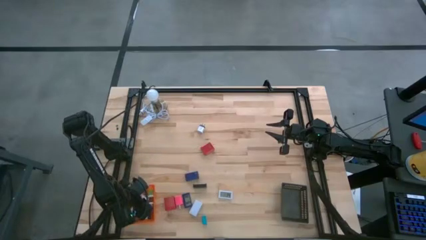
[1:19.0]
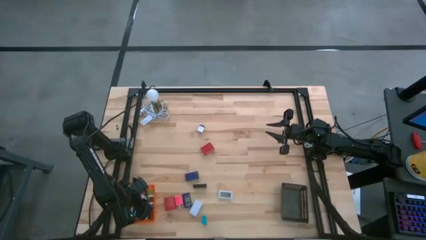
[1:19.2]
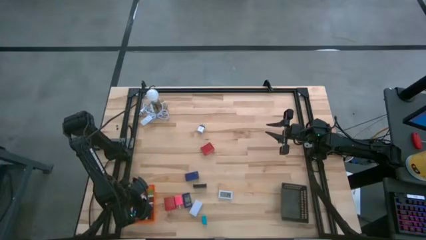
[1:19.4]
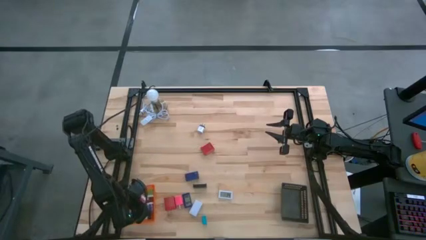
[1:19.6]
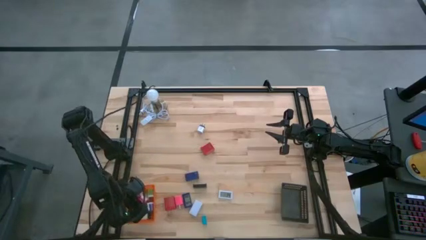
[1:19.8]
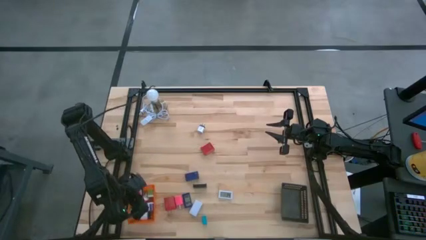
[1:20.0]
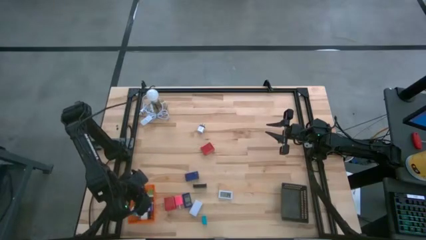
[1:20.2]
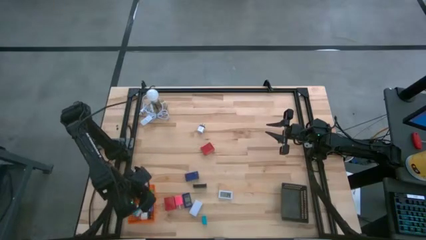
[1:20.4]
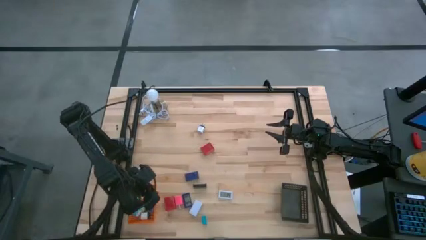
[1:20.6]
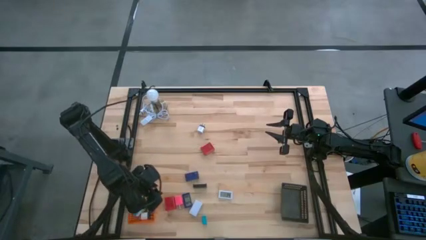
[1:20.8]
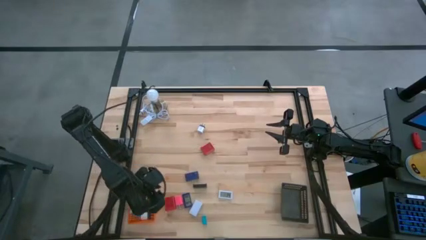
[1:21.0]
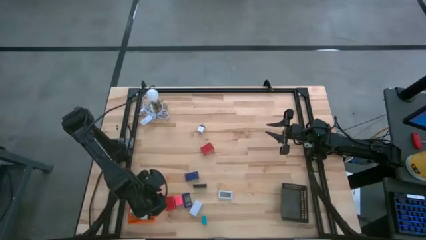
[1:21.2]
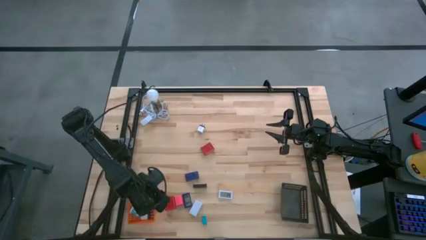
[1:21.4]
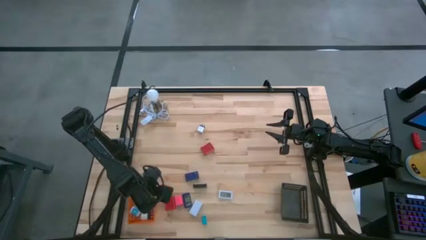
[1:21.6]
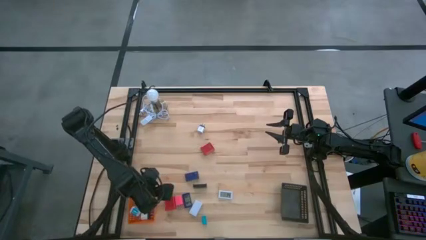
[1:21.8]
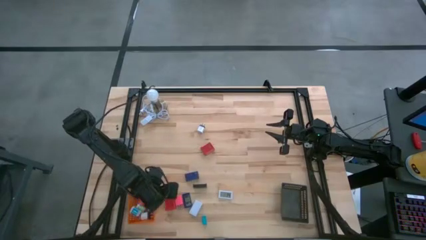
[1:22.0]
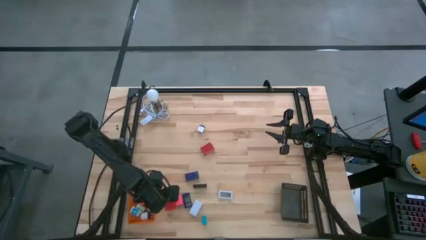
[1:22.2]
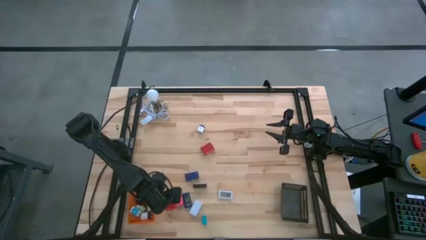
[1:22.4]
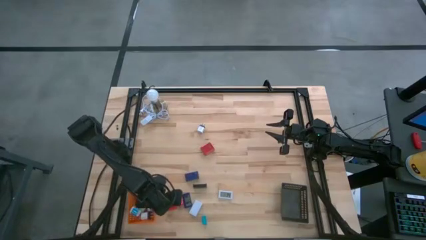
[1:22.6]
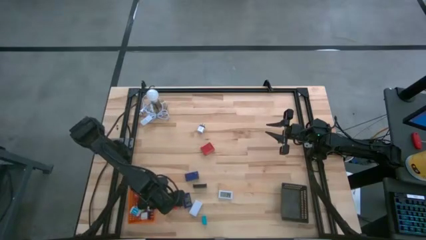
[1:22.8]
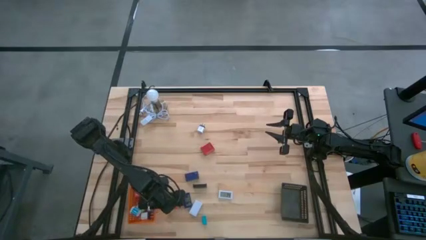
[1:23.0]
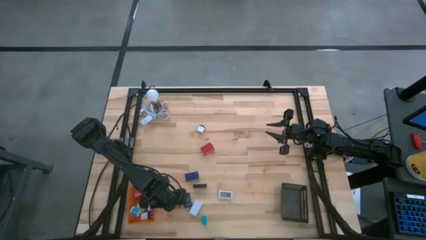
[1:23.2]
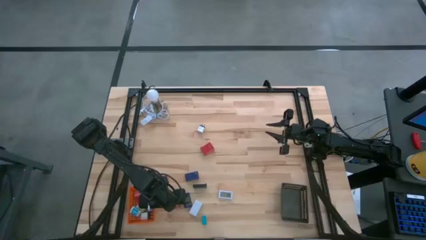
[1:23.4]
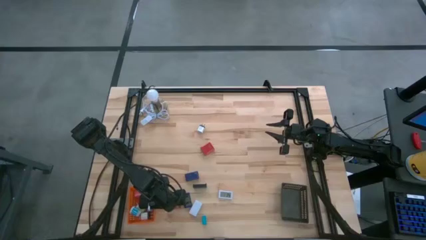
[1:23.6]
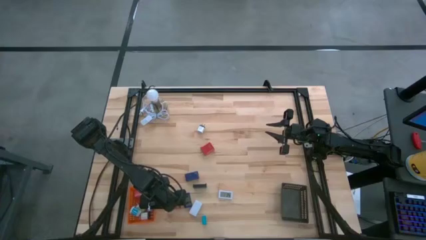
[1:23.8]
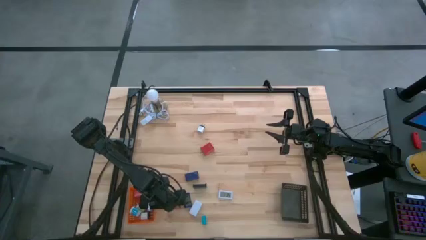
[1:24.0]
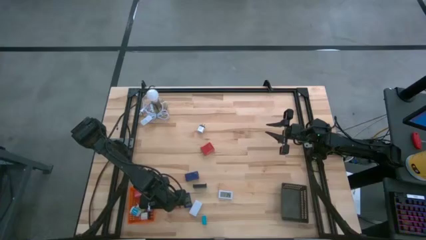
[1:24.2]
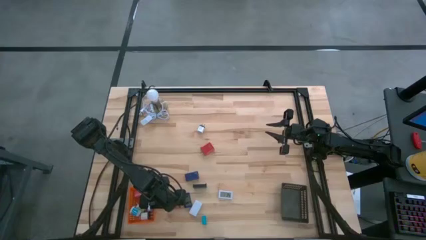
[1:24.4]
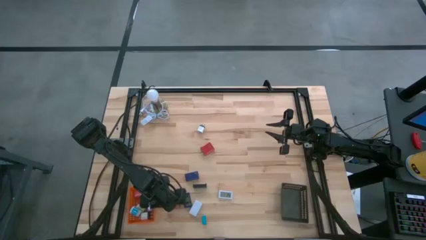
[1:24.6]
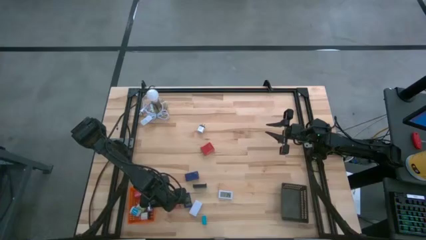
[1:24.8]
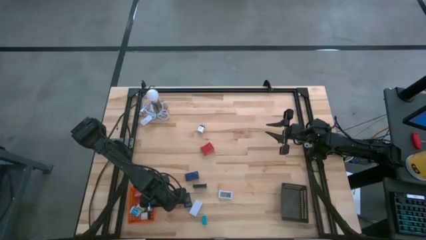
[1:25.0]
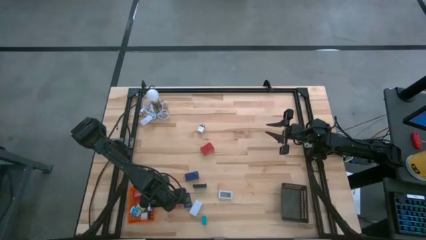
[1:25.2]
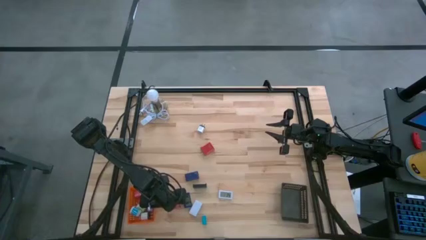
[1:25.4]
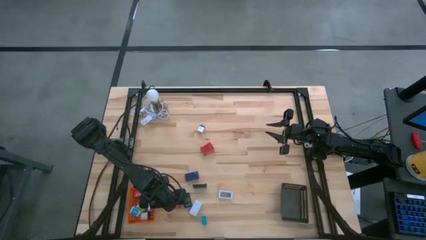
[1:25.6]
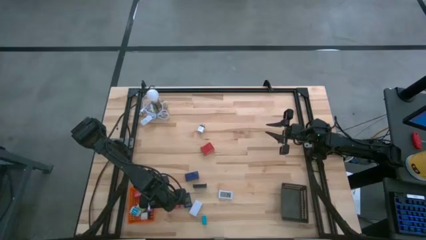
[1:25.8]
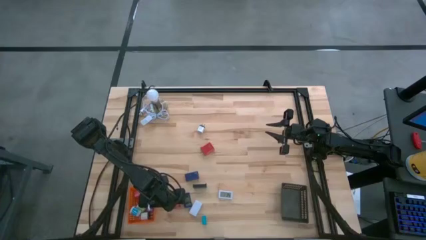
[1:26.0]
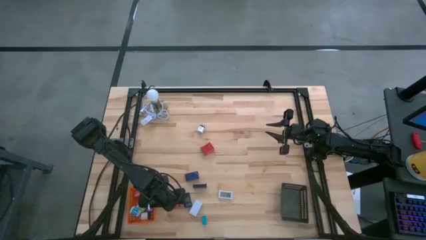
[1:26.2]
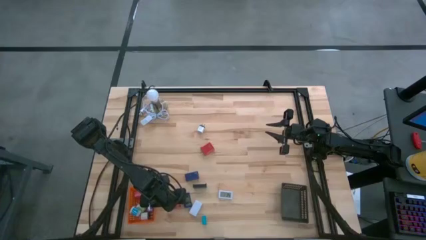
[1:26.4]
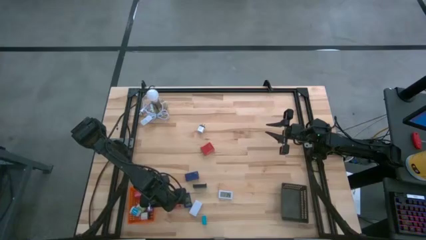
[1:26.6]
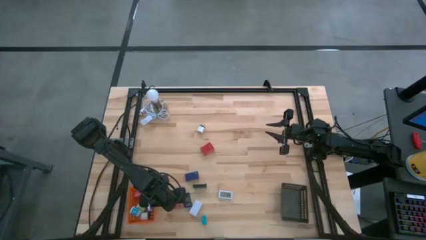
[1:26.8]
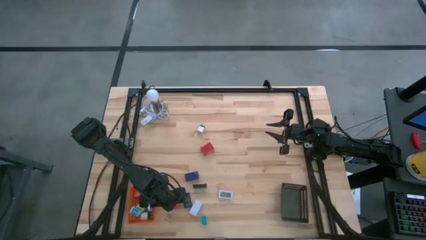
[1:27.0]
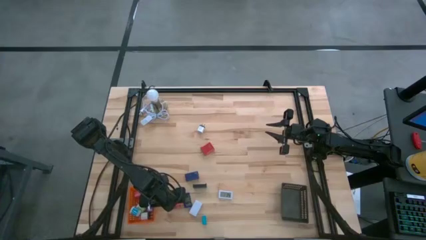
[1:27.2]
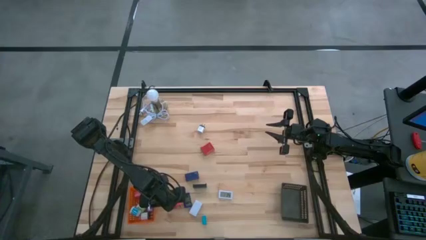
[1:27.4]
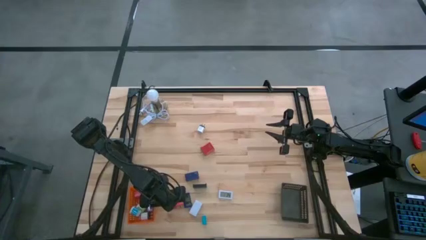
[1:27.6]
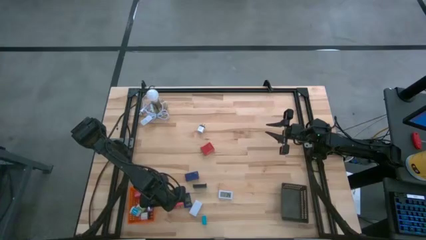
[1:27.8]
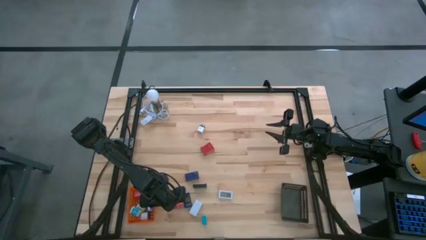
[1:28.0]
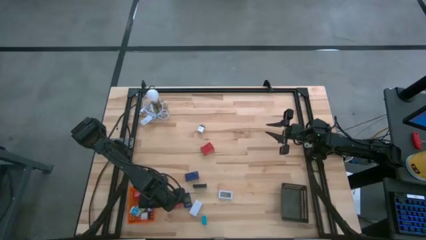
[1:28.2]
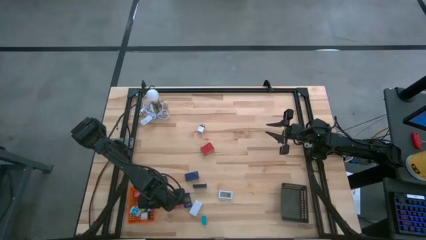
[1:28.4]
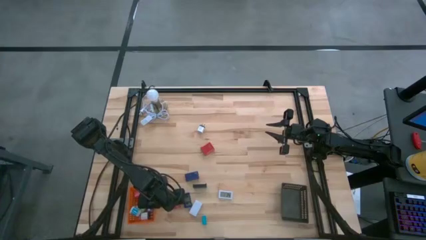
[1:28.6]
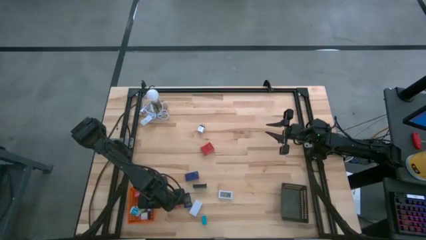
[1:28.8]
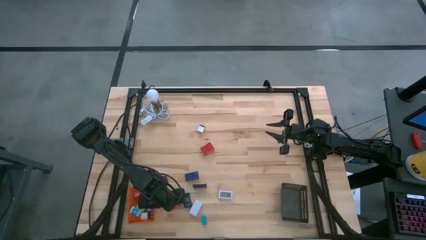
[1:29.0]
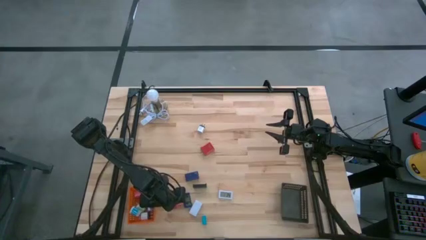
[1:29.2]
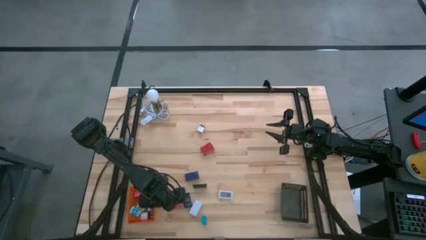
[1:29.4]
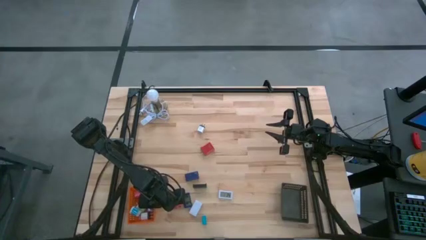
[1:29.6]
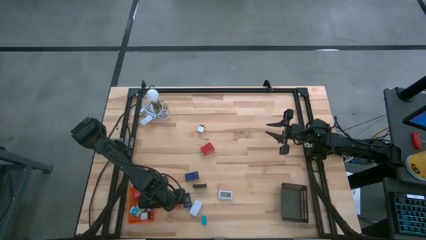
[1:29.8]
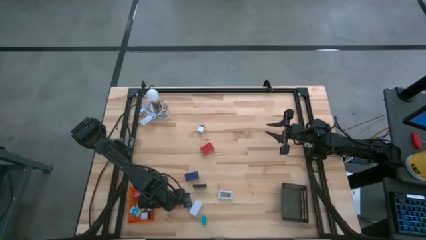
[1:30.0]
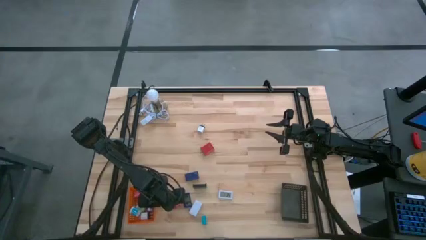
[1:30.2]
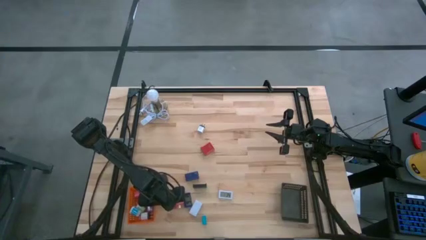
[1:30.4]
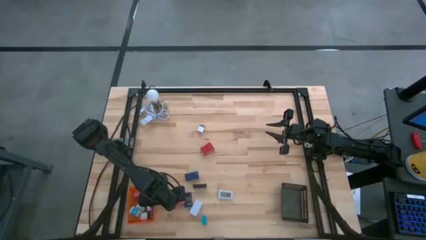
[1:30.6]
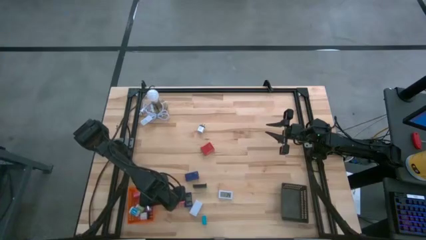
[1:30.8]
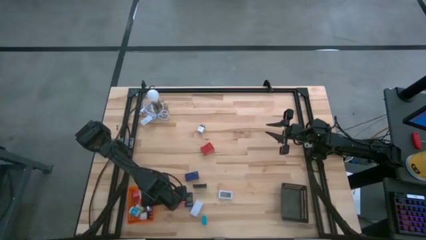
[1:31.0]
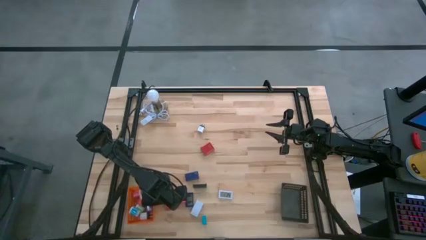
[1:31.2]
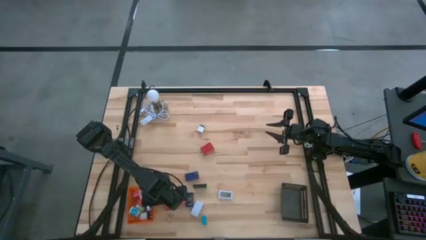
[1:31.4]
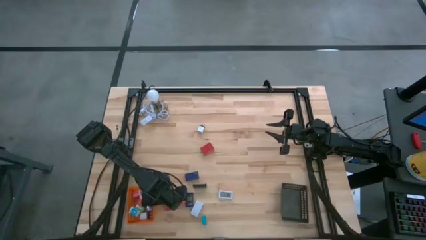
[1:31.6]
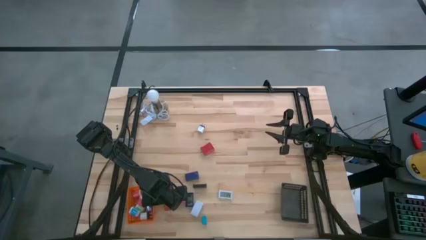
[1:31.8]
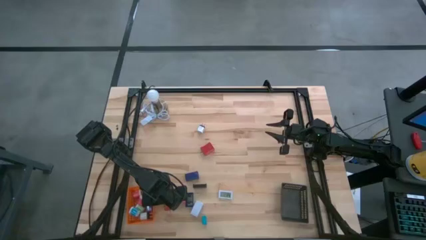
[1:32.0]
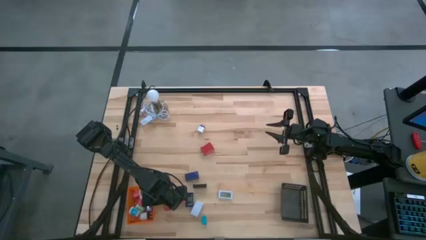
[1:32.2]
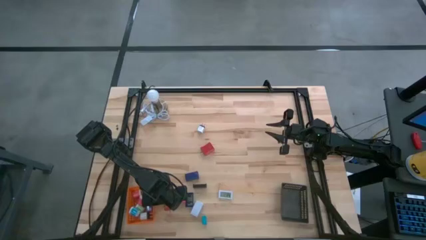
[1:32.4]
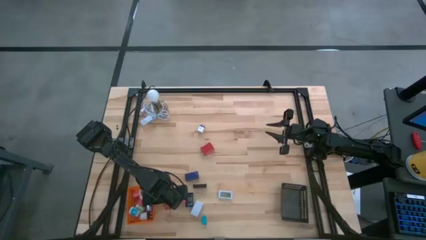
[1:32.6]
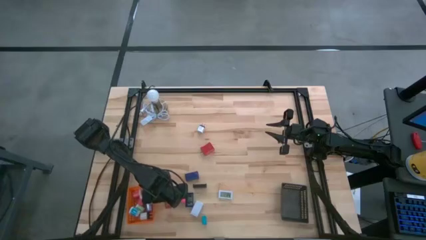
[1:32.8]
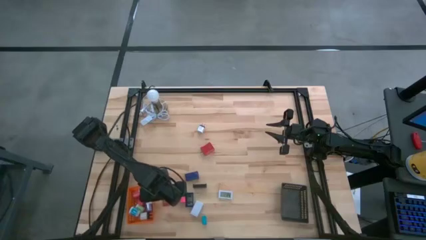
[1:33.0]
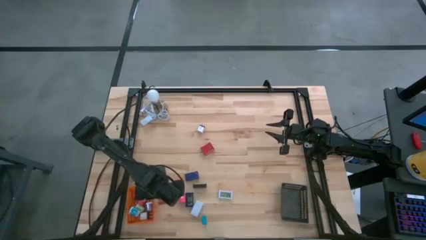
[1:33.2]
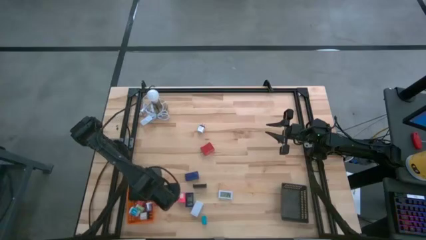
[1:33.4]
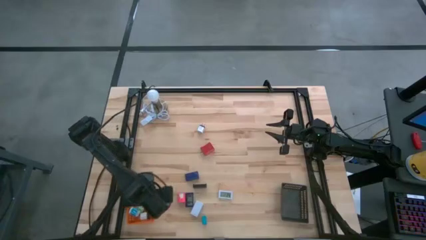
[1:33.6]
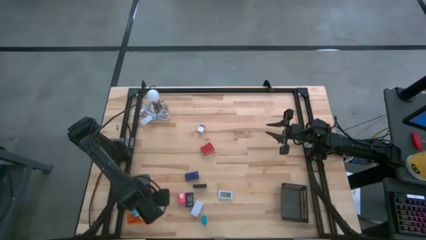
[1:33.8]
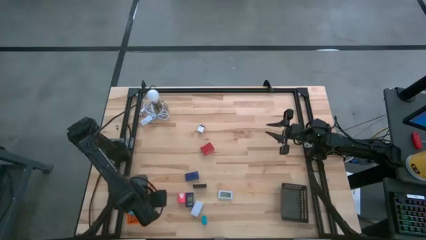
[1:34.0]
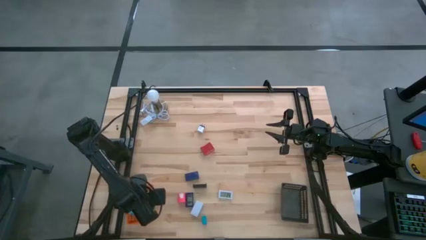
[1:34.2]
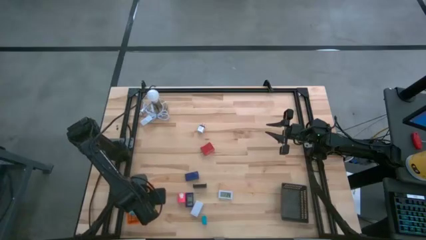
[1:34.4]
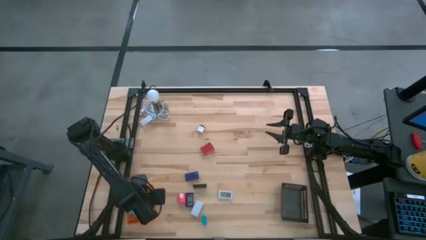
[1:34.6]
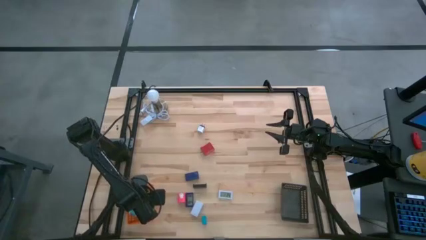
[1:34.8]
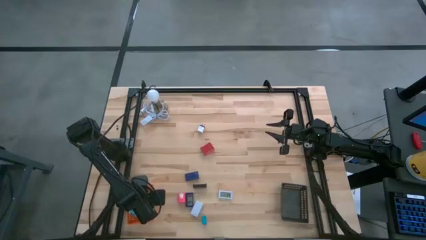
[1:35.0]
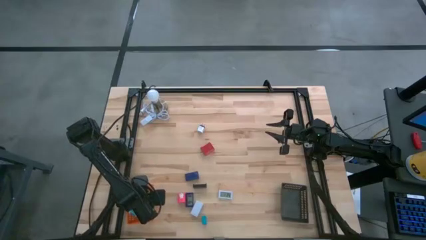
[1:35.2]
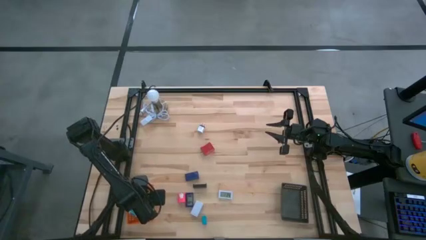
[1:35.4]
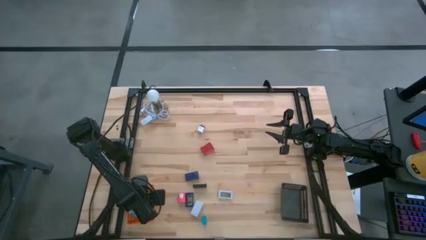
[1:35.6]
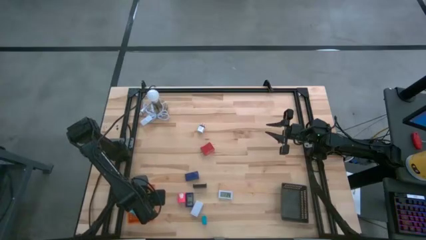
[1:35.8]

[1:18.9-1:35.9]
Task: Pick & Place Office items
Put the bottom red charger adapter into the orange bin
